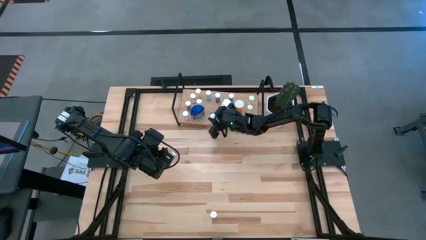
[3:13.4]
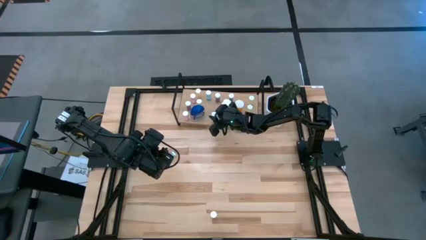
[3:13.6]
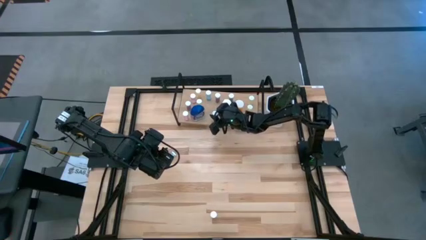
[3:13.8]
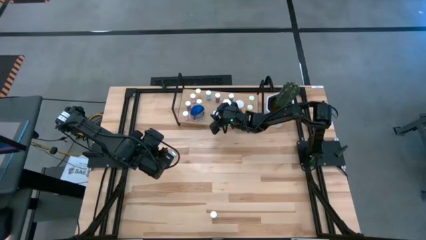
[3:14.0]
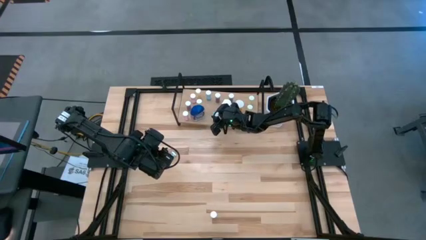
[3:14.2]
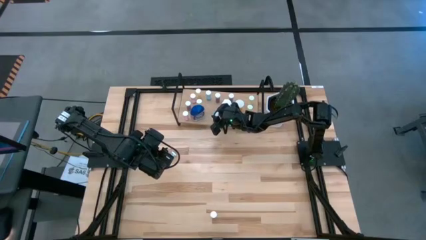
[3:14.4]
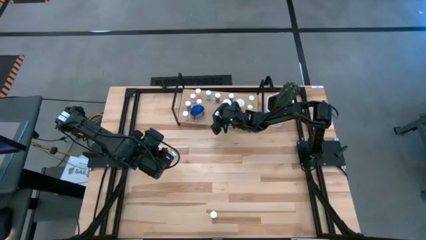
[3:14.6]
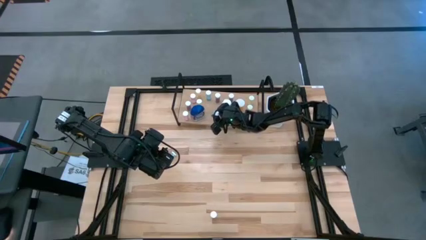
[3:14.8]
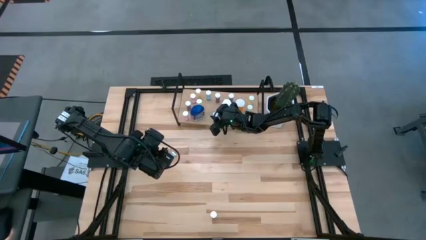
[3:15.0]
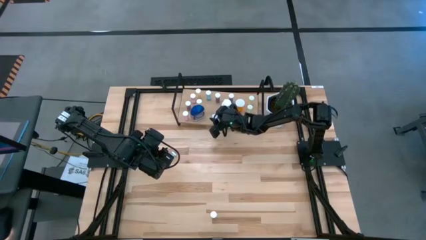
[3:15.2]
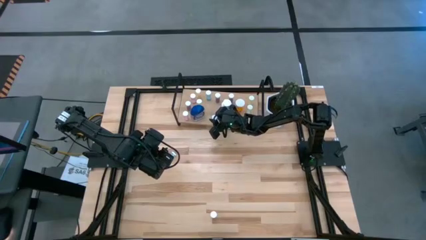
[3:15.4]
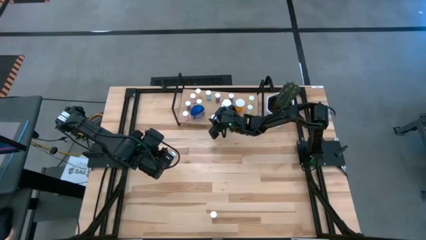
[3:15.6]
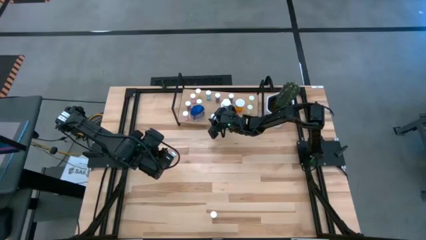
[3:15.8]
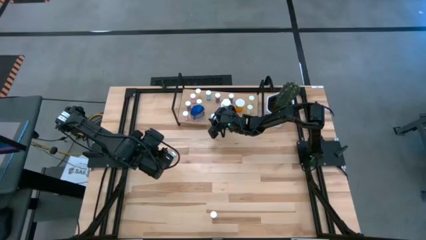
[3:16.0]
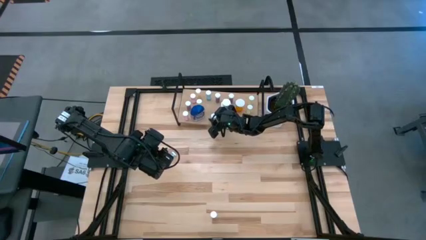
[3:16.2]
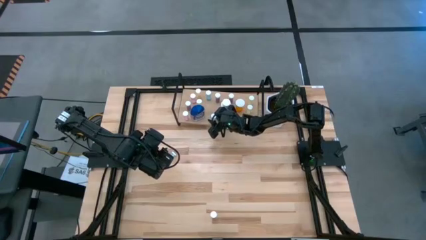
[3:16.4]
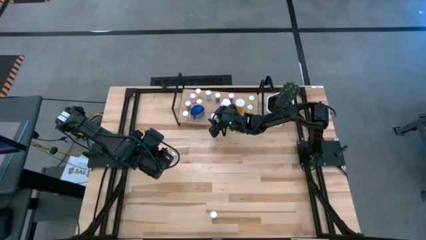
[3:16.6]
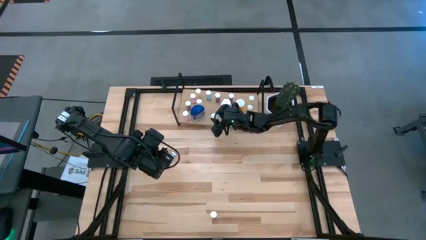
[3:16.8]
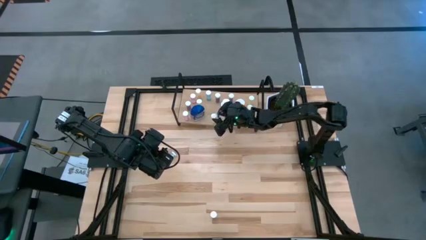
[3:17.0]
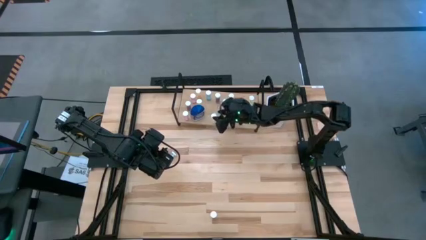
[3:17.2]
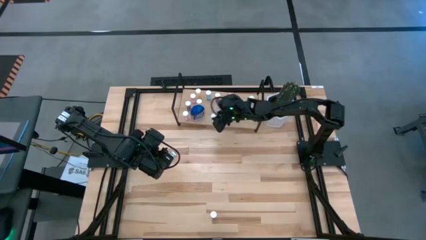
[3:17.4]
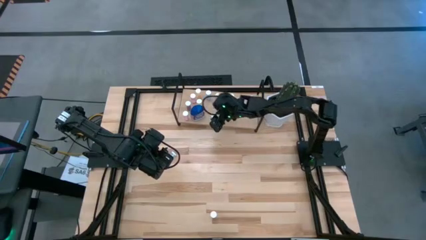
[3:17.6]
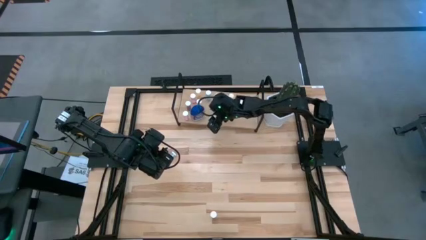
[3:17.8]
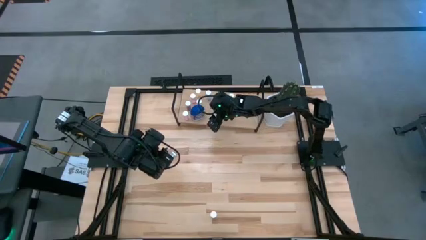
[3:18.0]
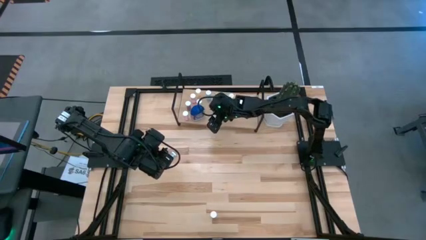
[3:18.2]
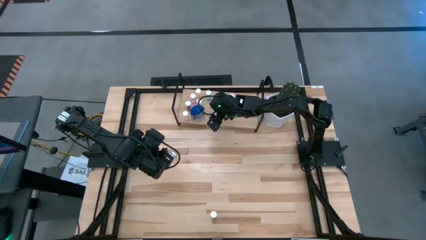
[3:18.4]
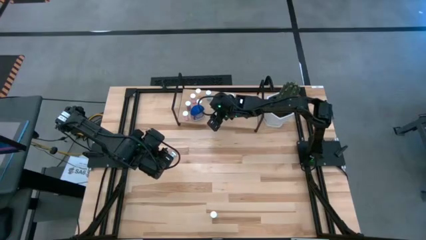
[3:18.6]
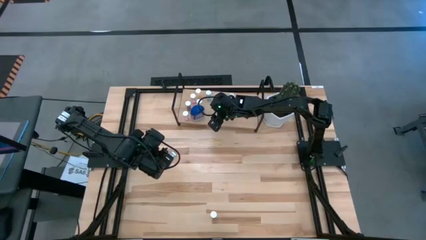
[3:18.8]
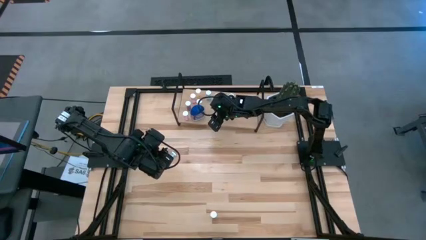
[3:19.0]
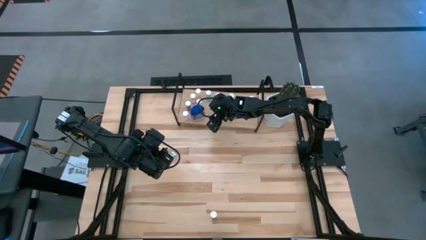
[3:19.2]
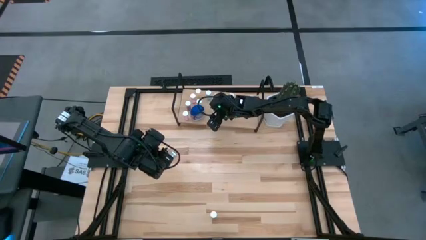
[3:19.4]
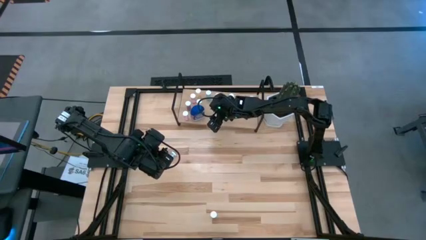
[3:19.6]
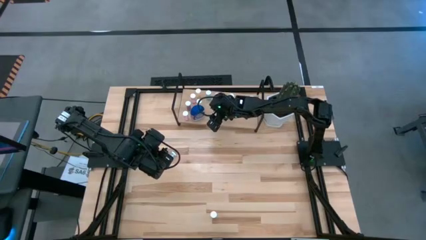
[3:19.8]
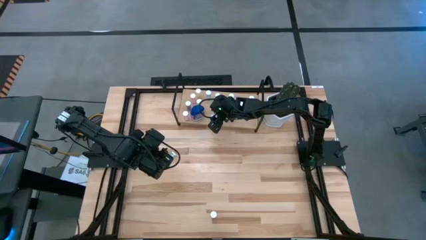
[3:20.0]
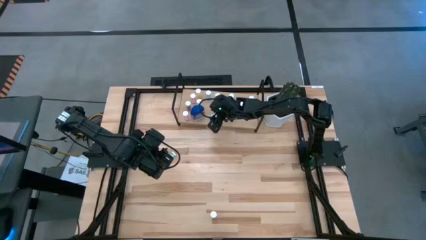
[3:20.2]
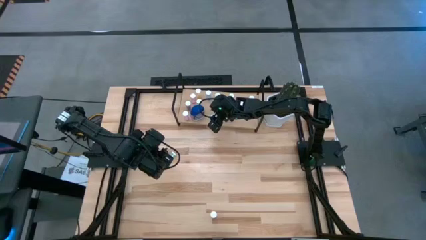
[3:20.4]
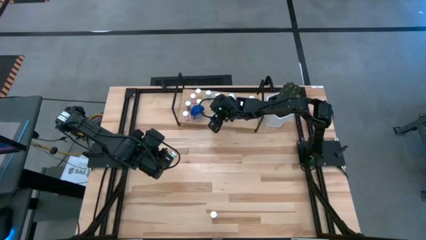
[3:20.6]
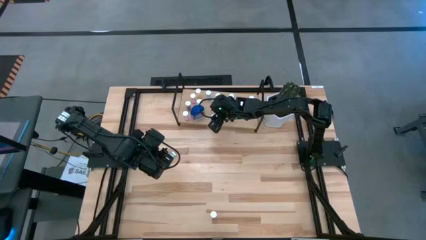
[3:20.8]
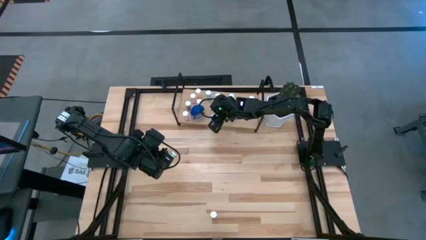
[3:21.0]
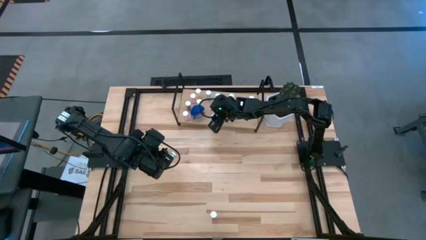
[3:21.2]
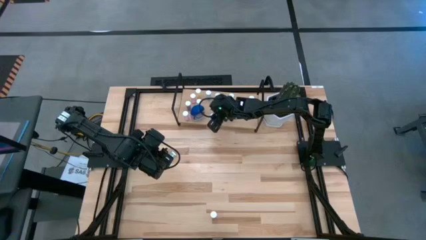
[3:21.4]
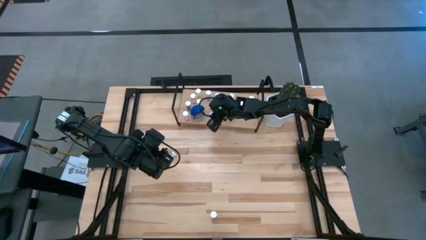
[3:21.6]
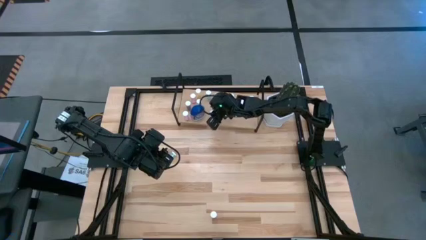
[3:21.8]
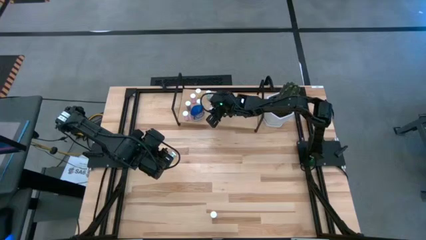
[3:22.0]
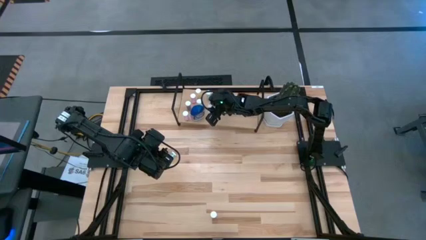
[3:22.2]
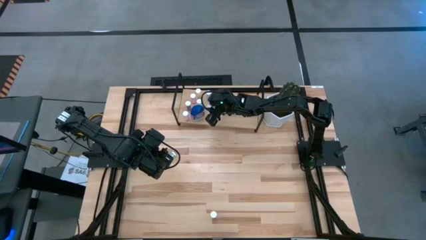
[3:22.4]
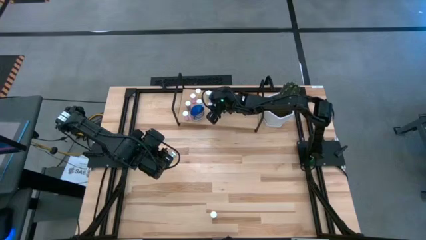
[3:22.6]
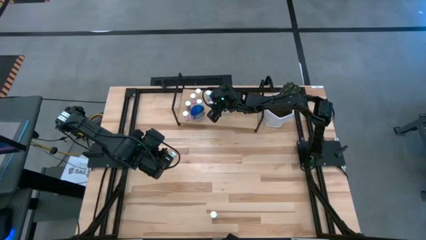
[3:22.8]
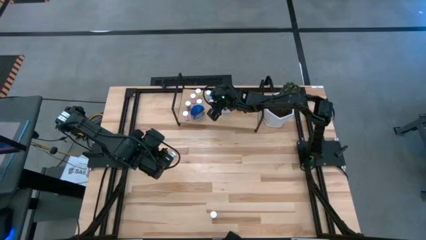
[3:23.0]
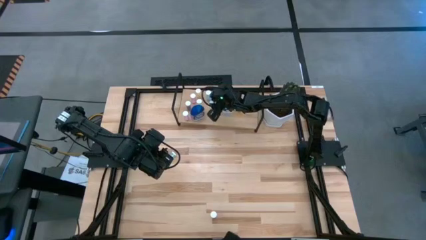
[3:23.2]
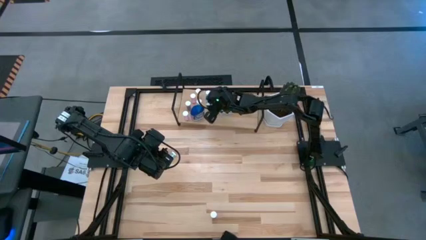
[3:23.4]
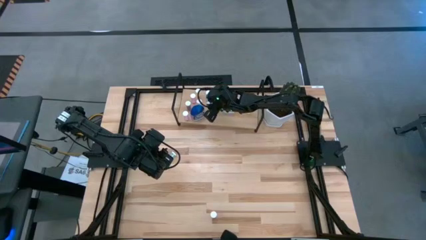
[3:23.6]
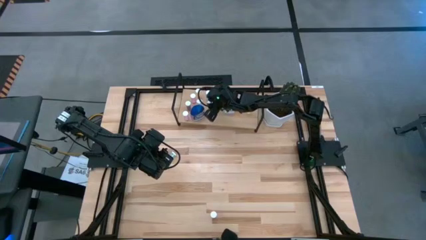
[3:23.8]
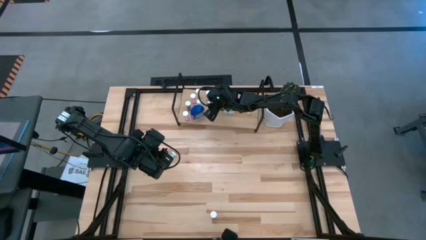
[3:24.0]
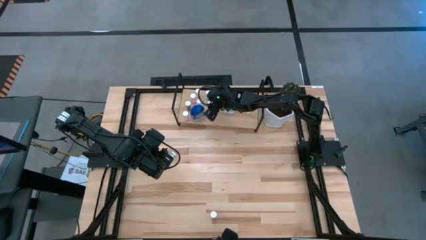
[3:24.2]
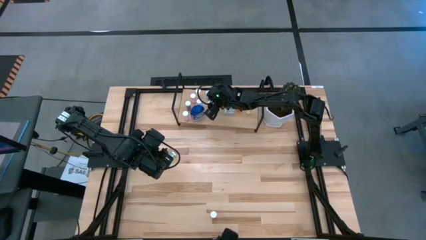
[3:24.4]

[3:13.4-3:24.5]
Task: Pick and place medicine bottles onto shelf by color
Put the yellow pill bottle on the shelf

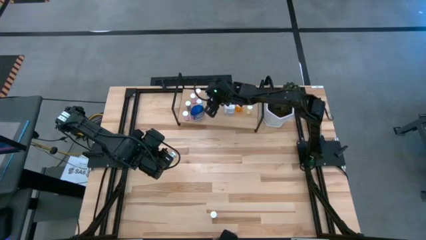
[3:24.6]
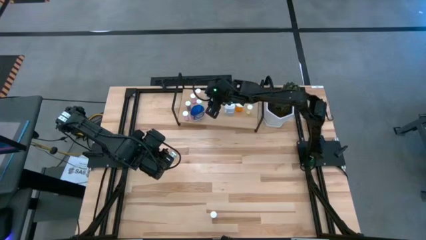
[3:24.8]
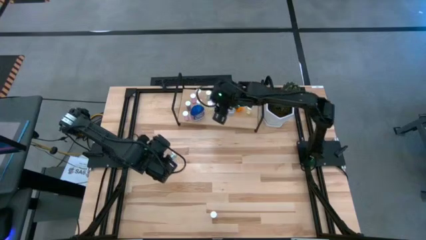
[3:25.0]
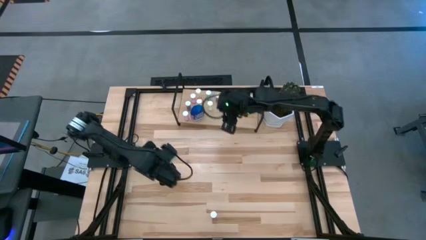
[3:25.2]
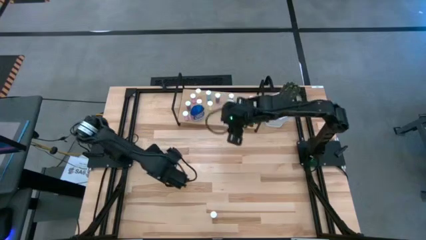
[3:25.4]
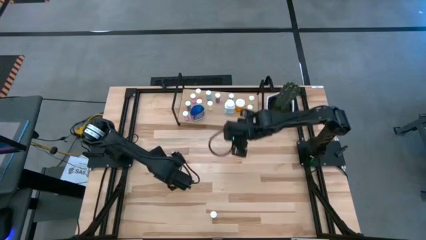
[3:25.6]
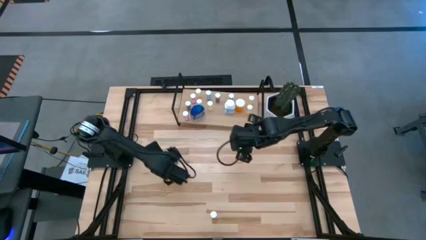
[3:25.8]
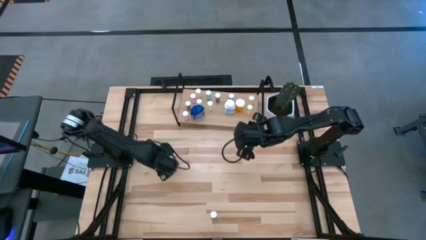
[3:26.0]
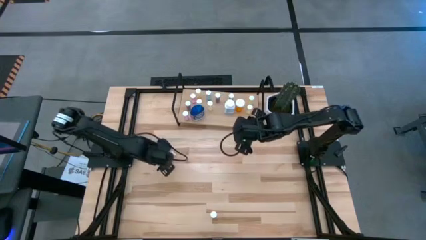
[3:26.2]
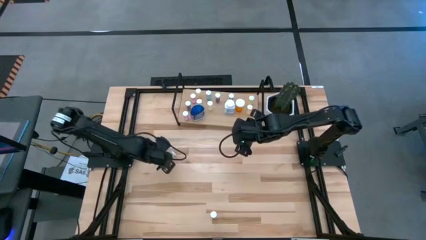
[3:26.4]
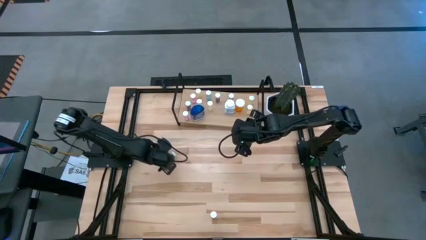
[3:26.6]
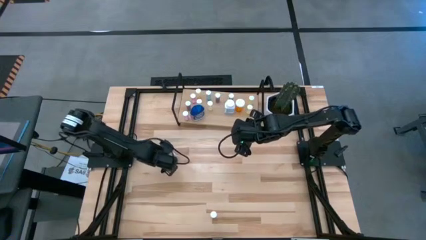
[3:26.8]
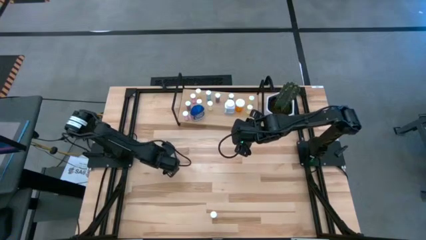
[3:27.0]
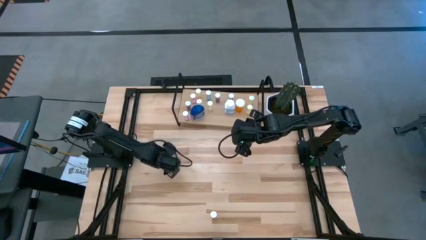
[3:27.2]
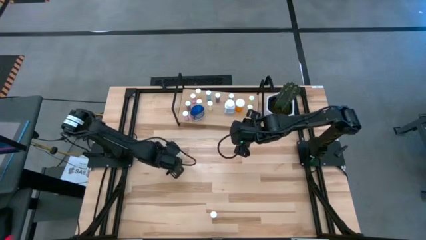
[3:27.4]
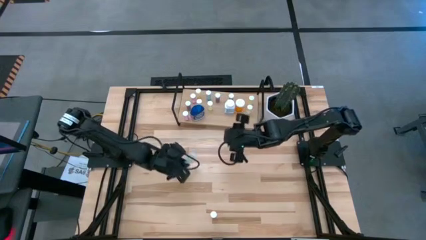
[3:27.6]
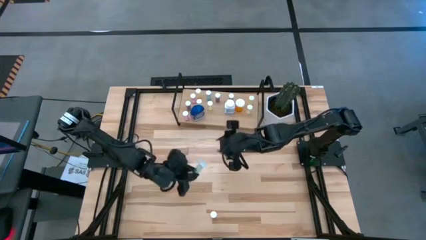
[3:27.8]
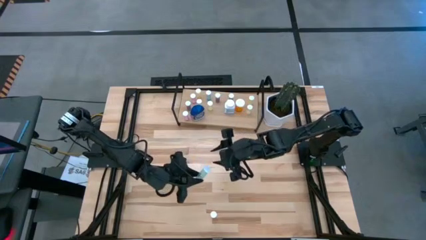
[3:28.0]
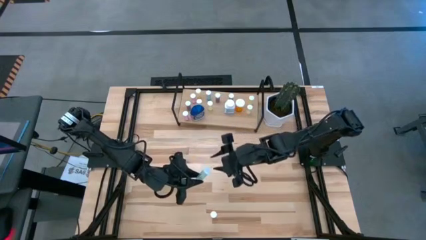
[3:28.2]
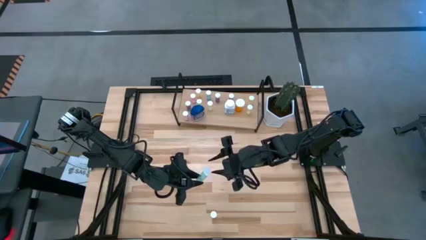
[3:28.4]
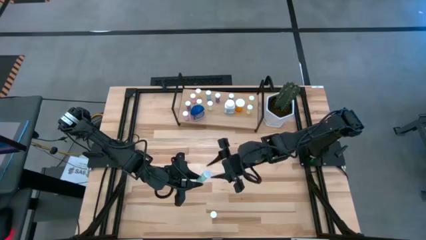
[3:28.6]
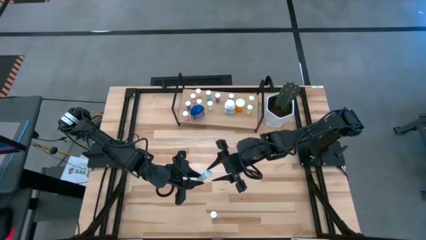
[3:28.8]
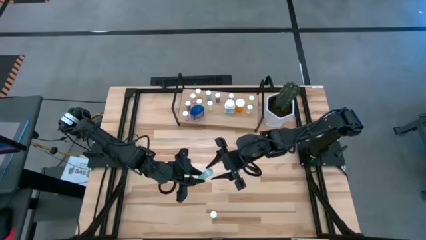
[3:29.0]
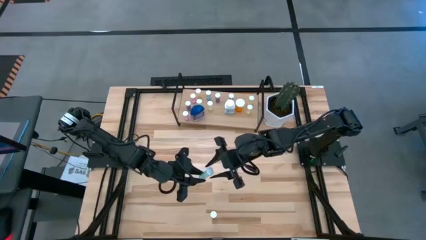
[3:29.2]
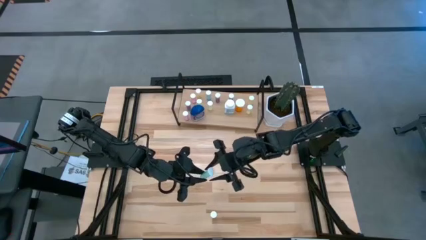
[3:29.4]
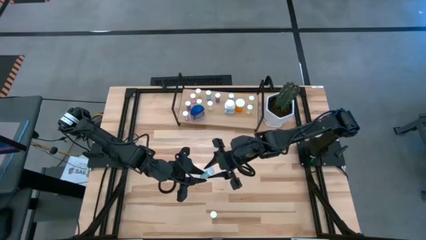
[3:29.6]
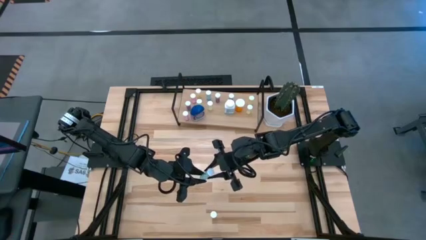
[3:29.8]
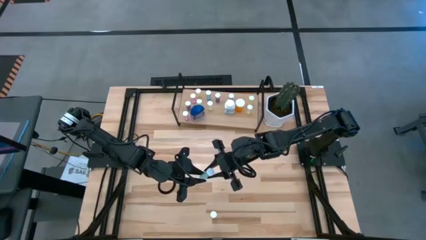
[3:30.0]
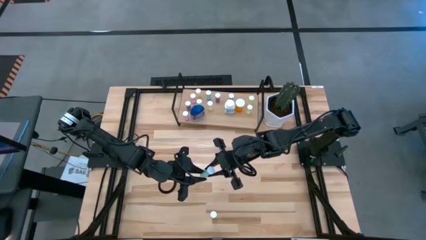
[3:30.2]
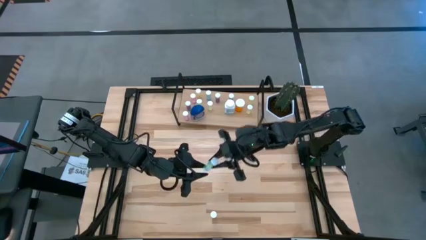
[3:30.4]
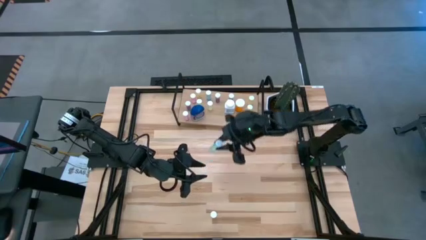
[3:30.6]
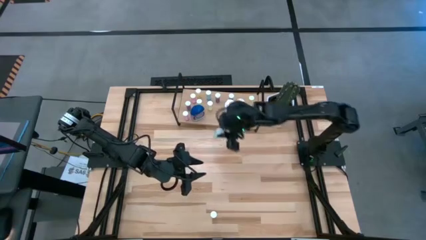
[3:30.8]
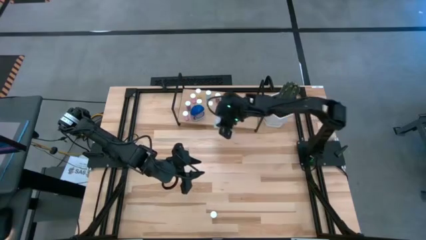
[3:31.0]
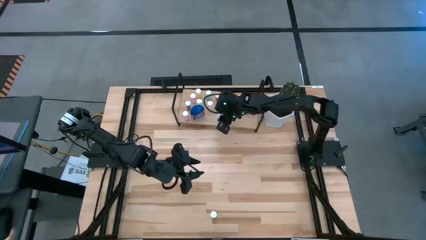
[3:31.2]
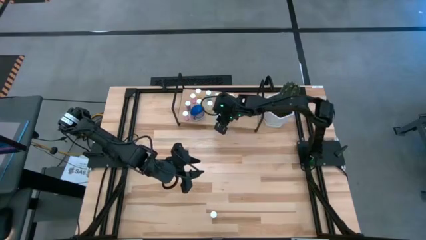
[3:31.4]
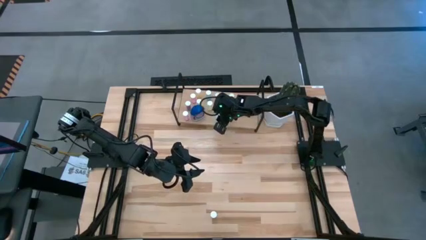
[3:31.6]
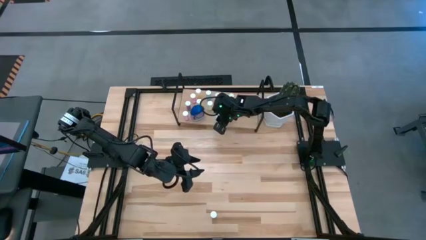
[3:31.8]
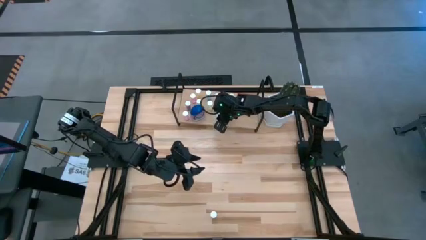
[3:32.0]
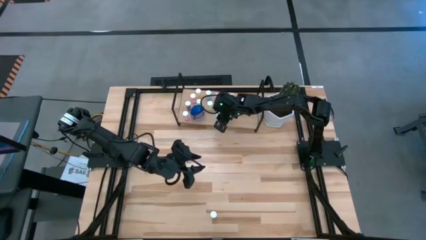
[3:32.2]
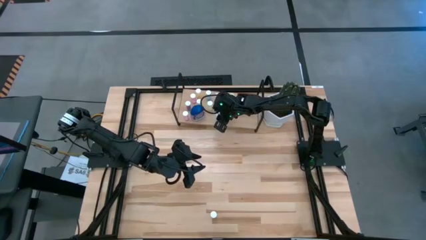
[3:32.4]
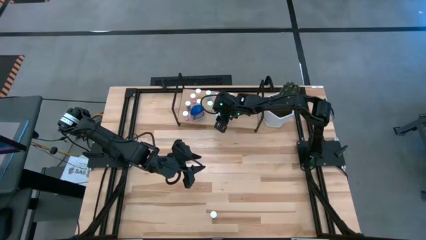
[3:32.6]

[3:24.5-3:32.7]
Put the blue pill bottle on the shelf
